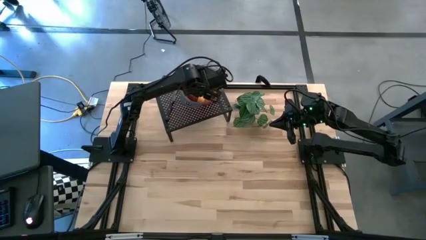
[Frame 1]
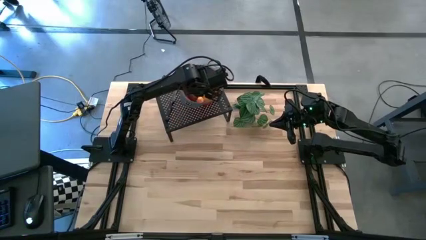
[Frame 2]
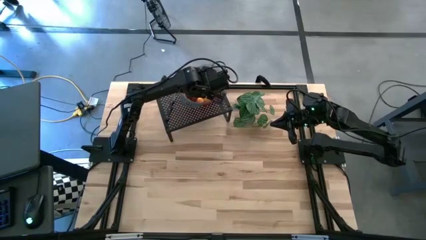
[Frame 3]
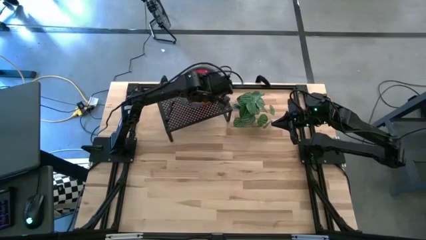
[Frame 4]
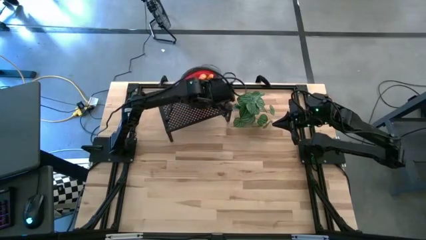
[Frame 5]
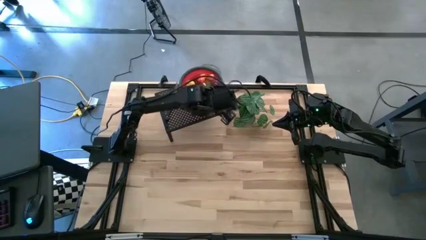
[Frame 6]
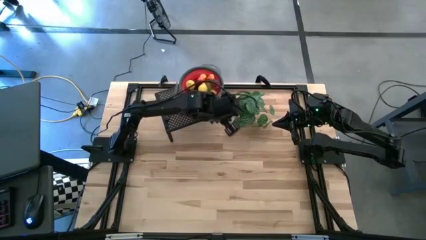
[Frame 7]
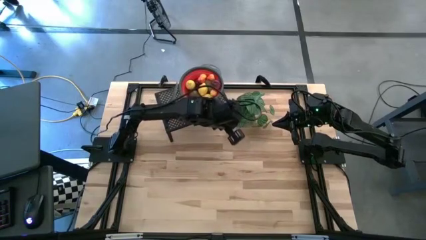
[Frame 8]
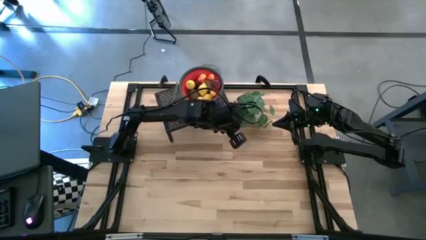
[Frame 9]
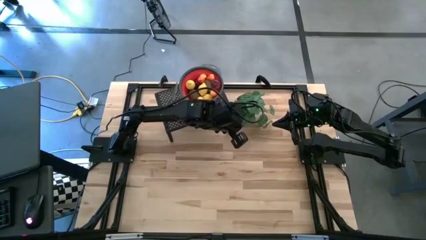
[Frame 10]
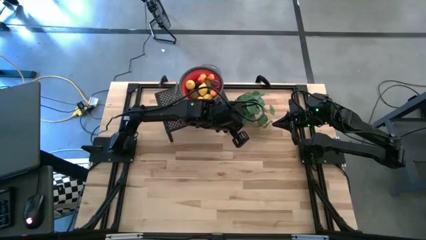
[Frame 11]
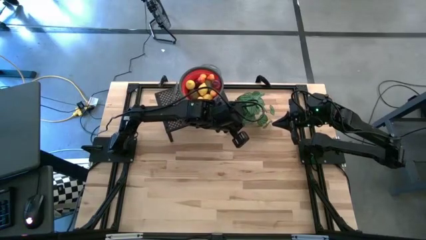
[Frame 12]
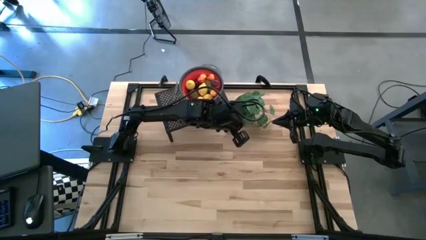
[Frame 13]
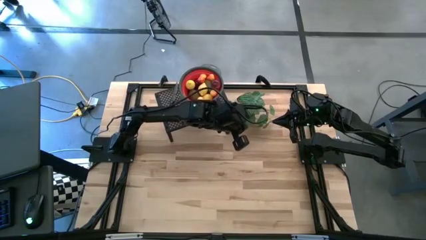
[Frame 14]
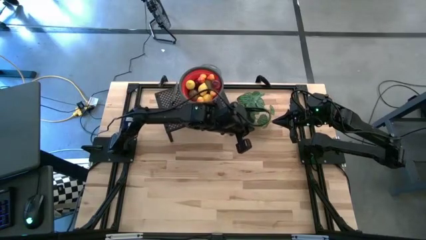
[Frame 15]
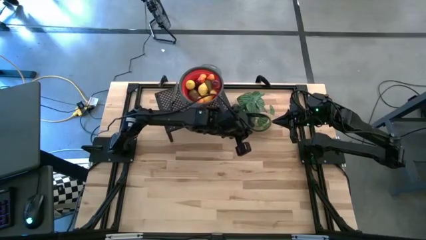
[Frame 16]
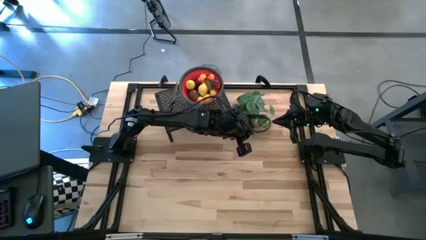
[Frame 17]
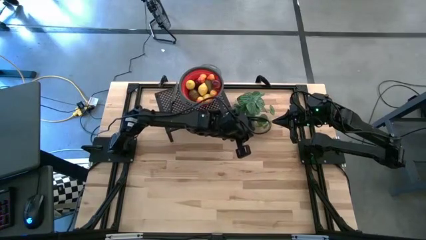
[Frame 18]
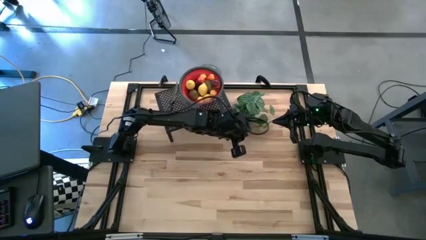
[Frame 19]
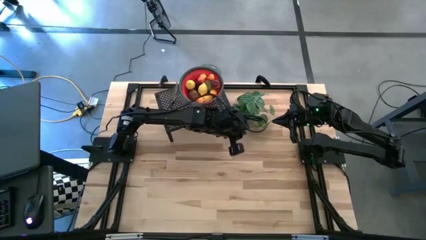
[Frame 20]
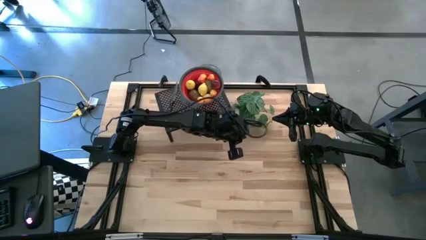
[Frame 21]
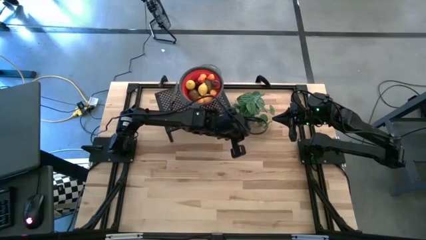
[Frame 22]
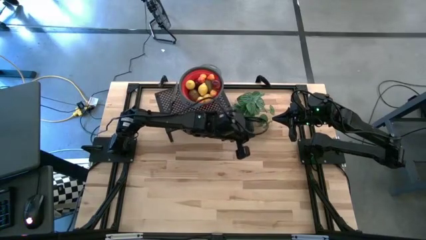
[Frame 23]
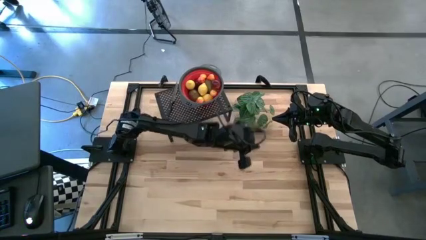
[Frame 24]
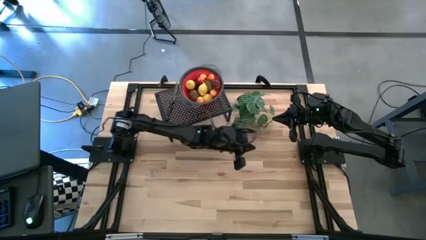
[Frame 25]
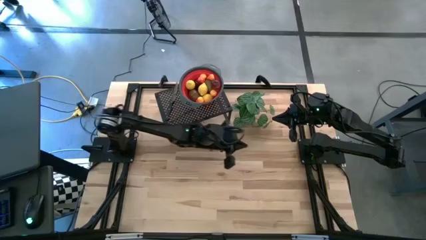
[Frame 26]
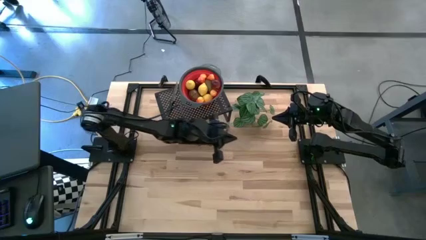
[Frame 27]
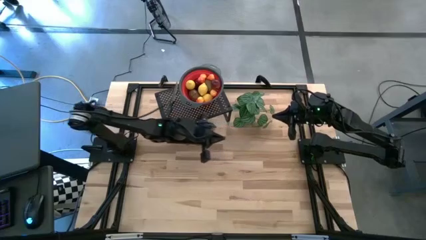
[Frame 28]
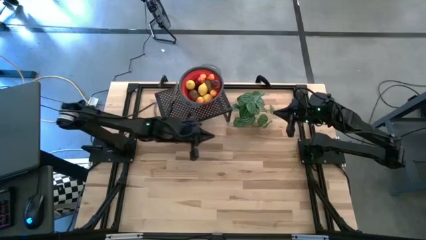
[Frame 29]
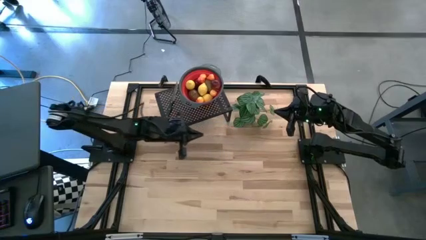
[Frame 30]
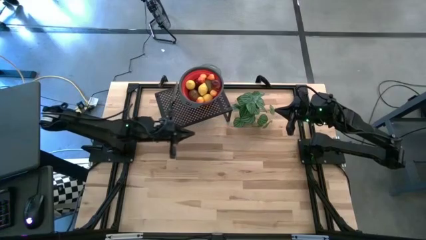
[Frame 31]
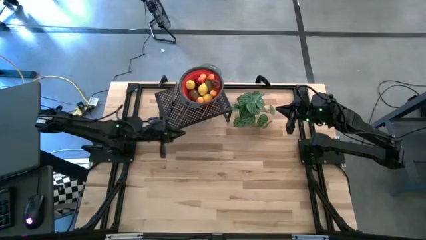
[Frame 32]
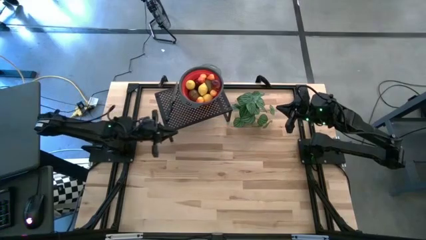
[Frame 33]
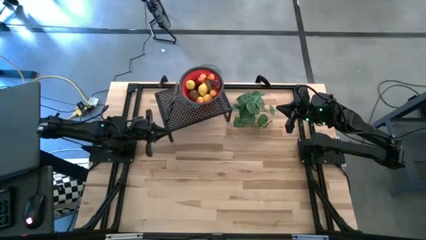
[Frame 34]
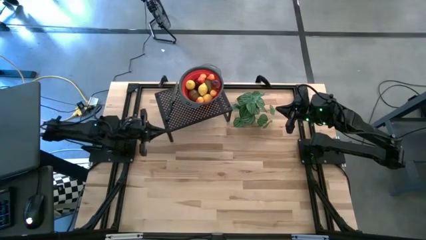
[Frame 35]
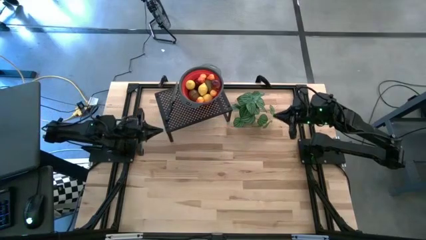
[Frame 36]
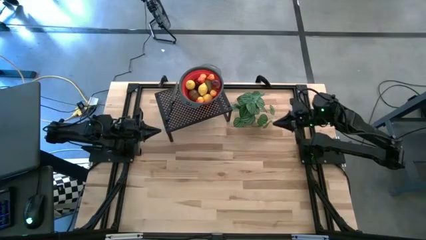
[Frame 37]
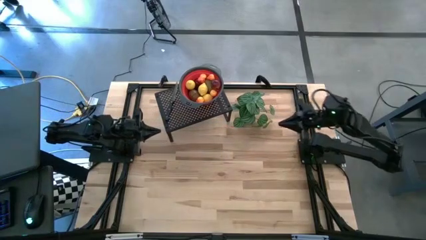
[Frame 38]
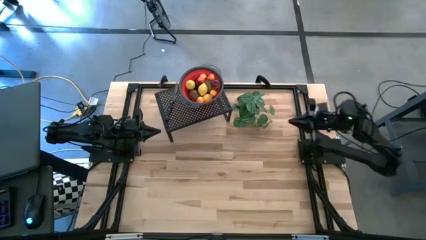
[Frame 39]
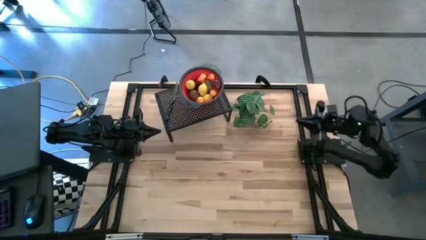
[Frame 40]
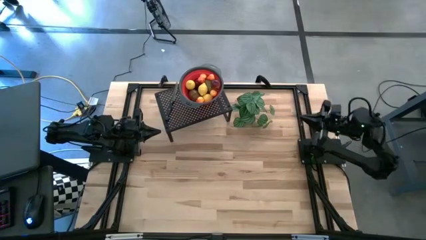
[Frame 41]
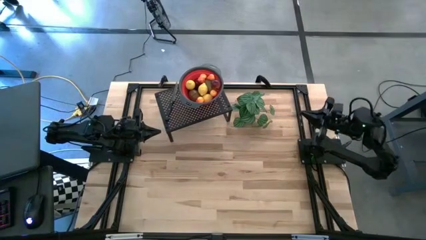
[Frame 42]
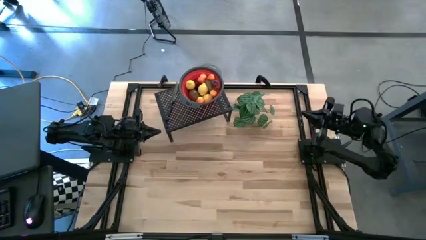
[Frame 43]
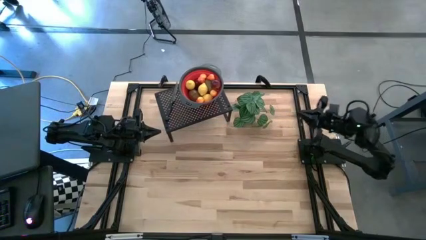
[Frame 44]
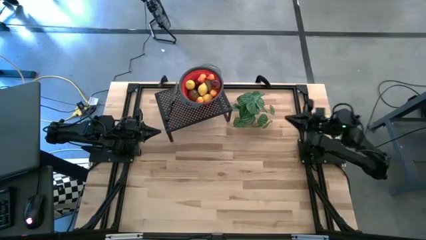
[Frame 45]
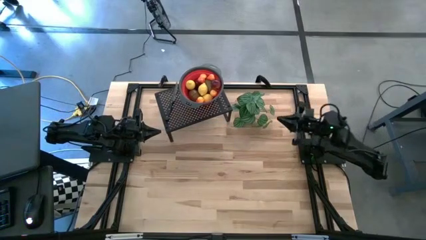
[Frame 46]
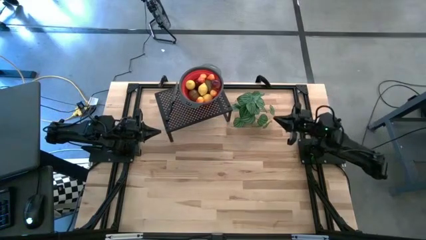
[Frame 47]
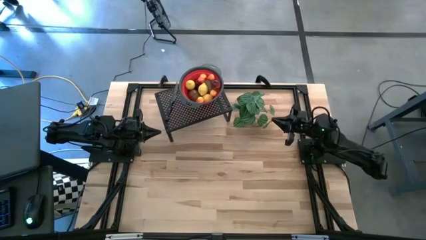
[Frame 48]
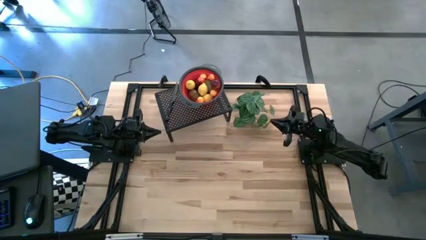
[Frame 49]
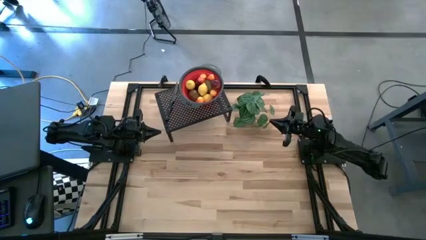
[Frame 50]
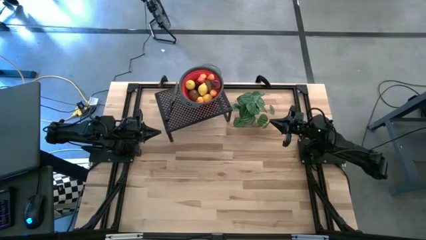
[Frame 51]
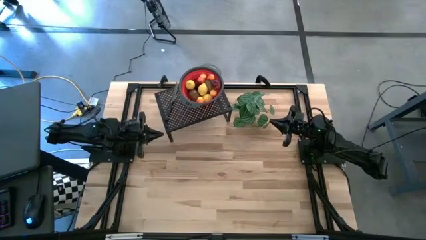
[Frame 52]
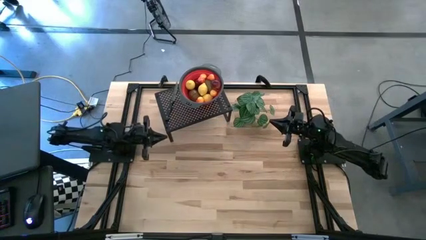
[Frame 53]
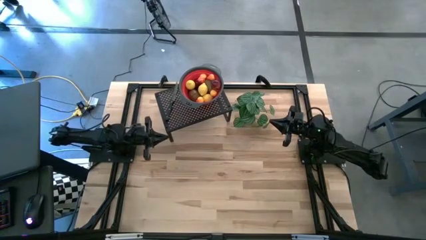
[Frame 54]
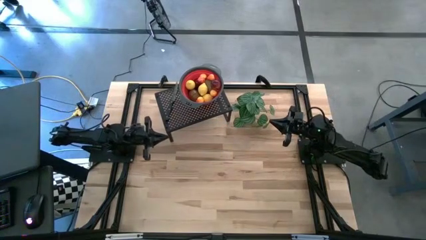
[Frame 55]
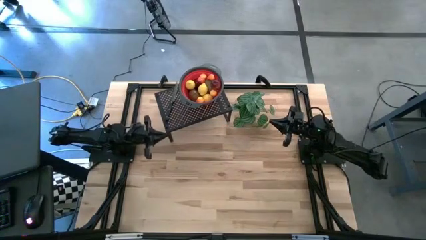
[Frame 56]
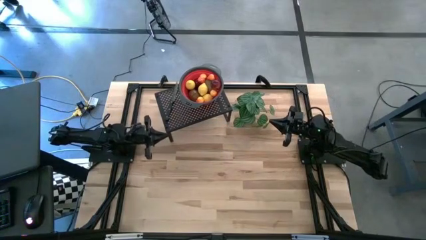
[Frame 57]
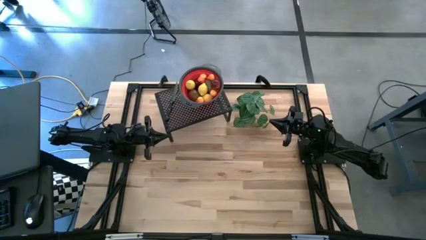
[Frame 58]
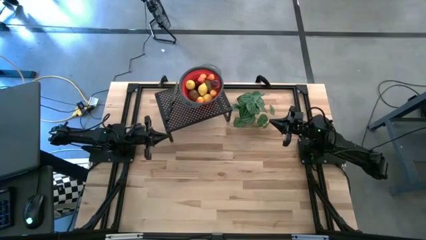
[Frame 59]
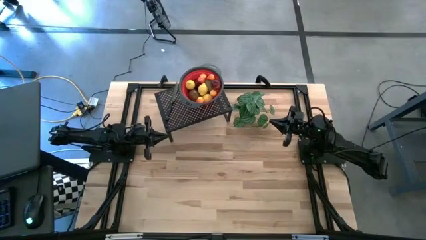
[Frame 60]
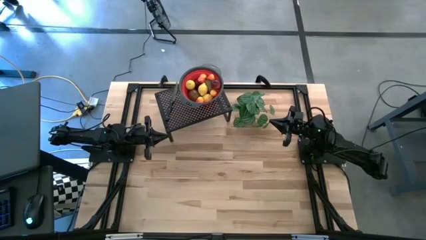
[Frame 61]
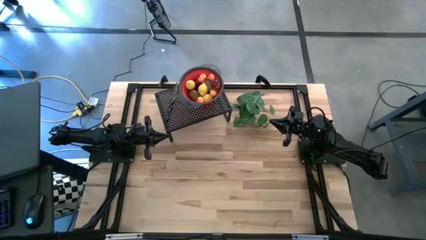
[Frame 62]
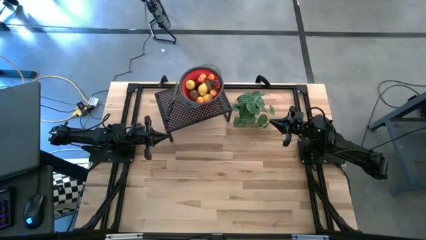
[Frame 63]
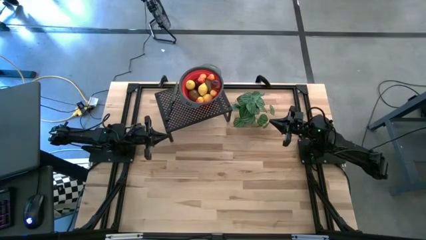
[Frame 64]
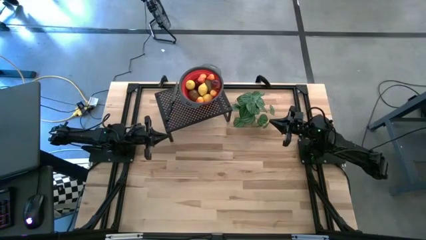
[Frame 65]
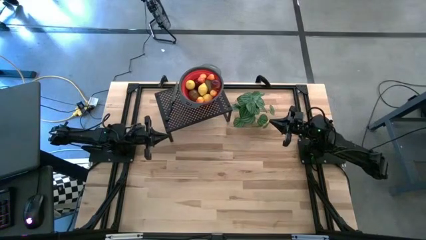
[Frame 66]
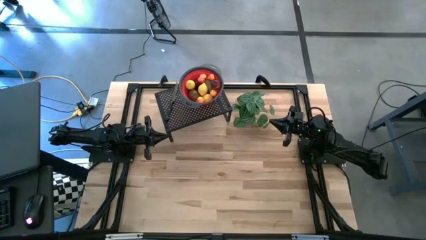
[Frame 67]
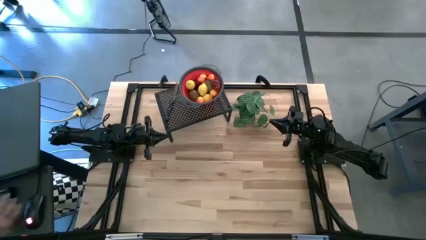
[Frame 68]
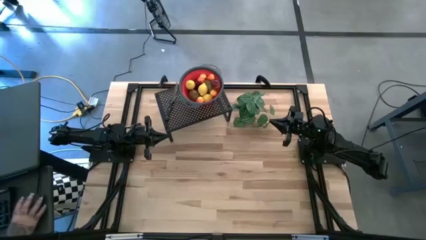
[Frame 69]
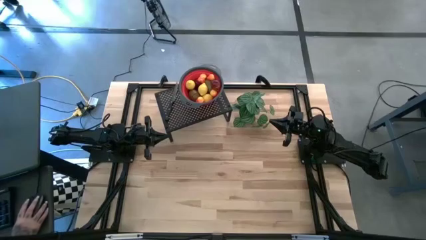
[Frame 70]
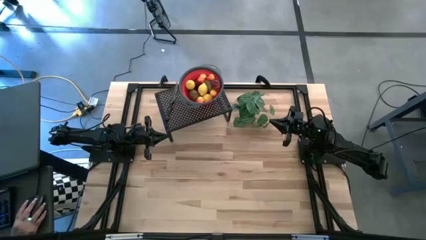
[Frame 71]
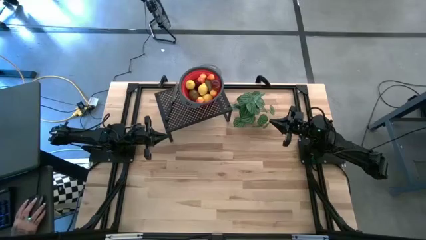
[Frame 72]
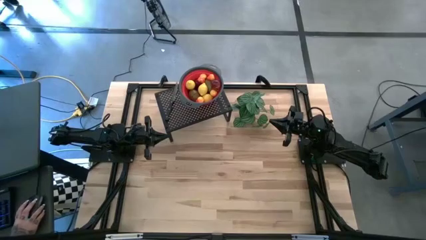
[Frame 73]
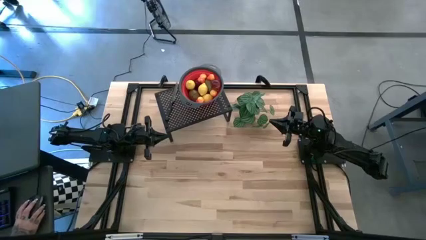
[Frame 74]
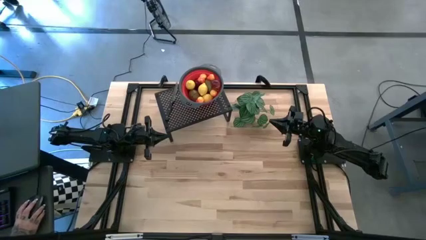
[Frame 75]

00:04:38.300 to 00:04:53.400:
Task: Pick & Place Fruit
Return to Home Position
